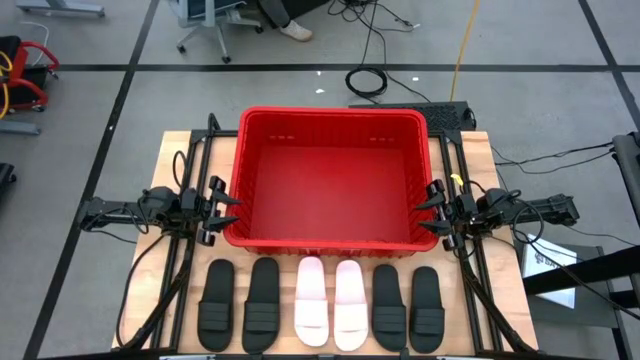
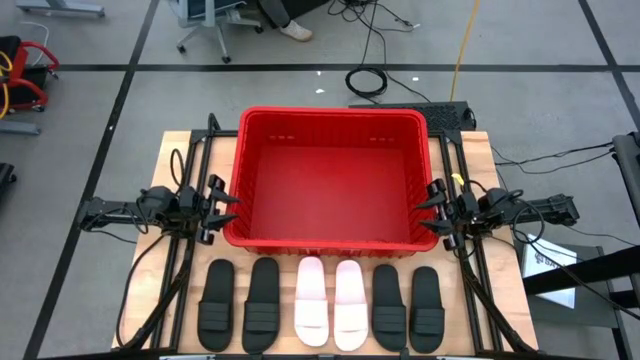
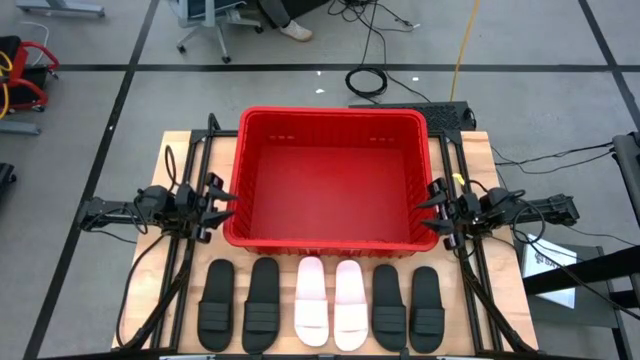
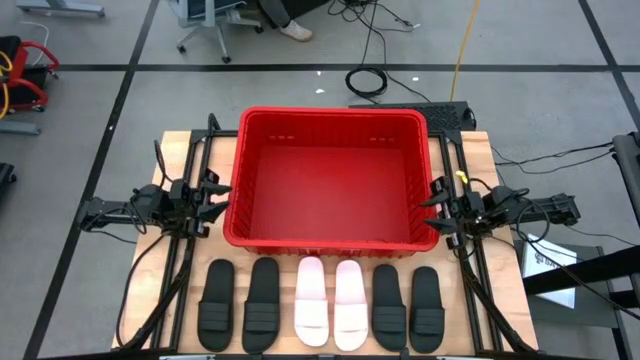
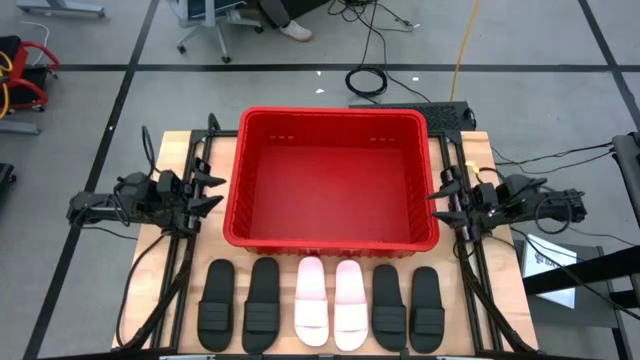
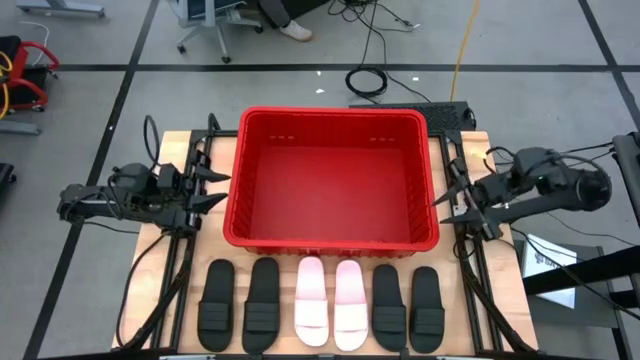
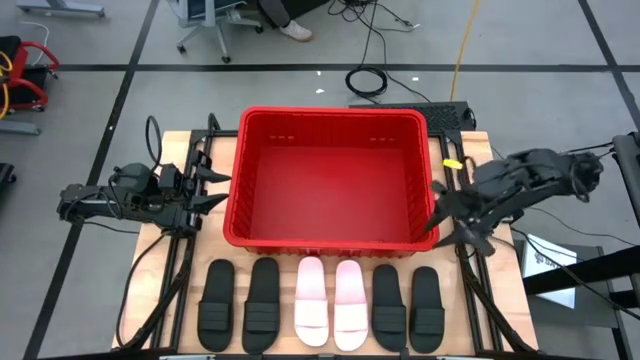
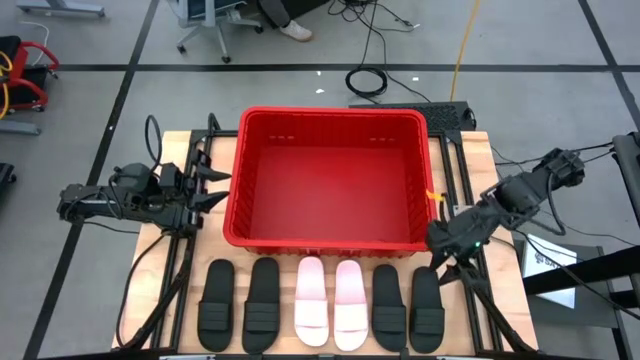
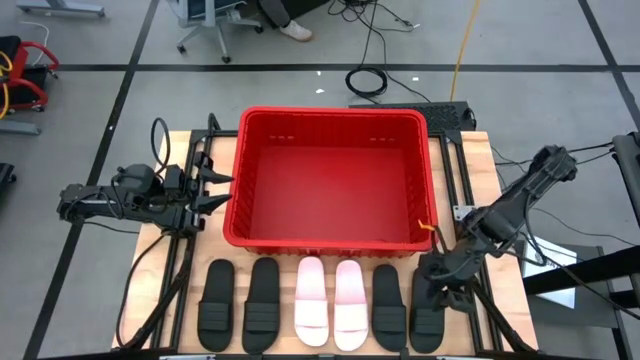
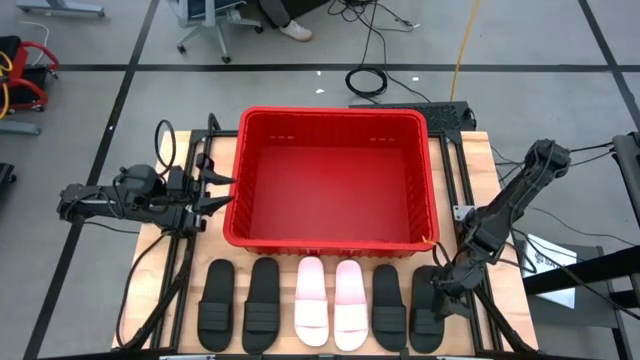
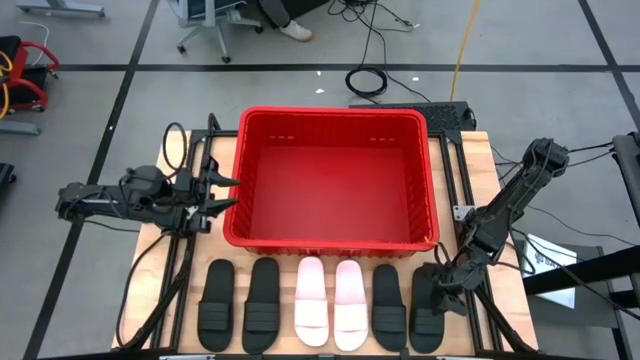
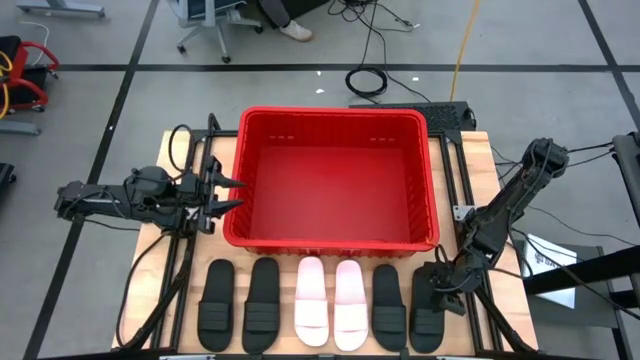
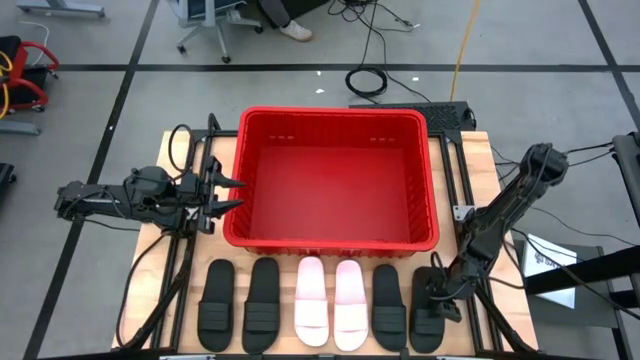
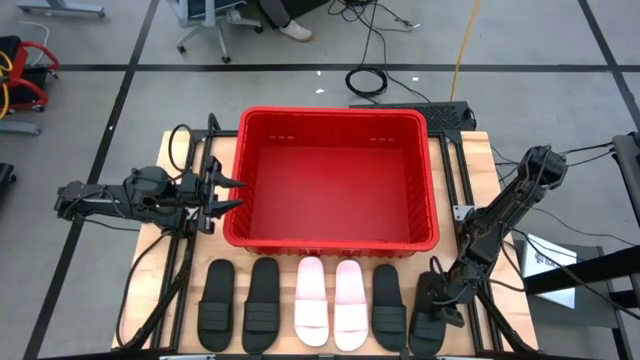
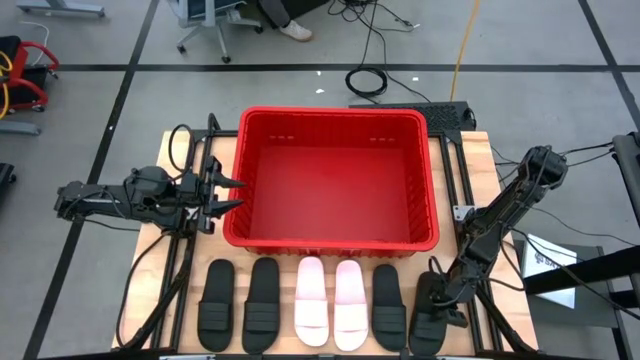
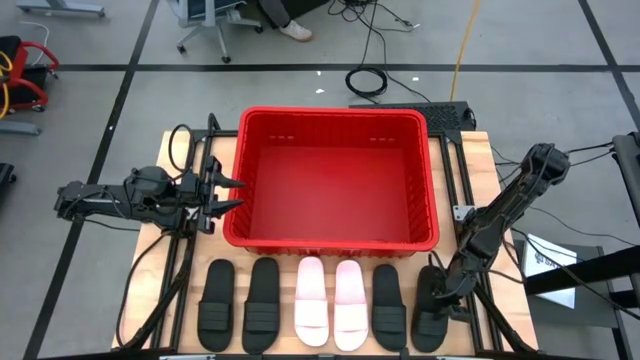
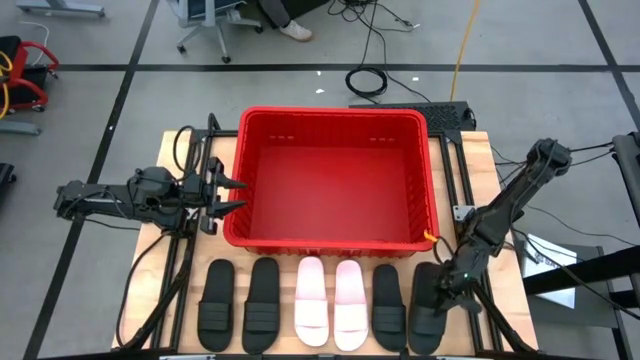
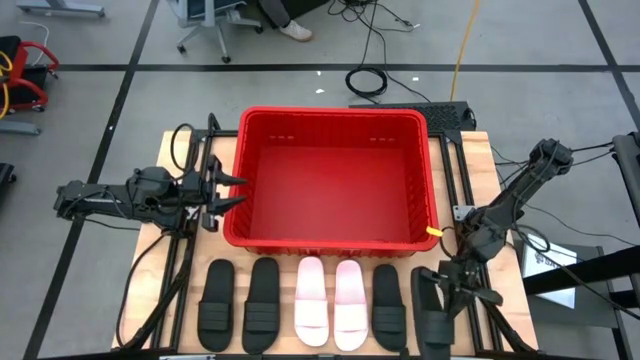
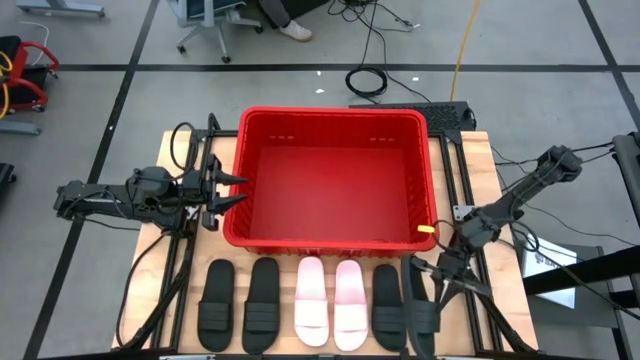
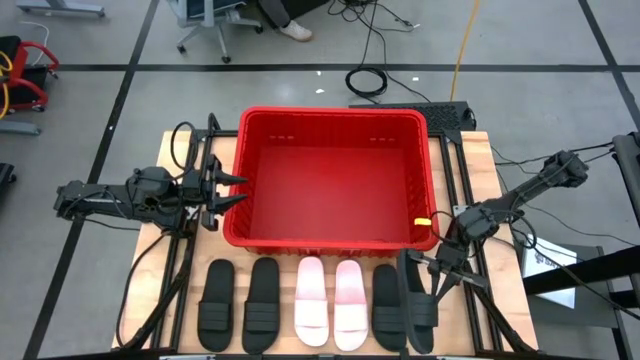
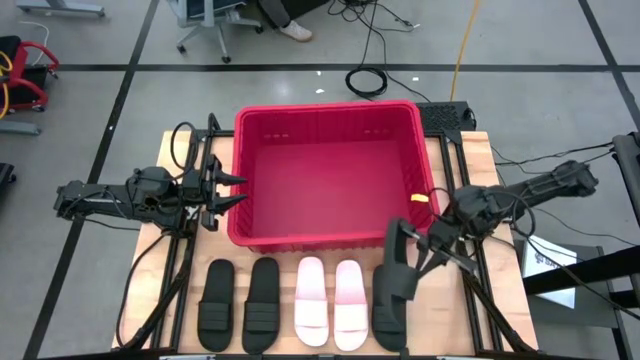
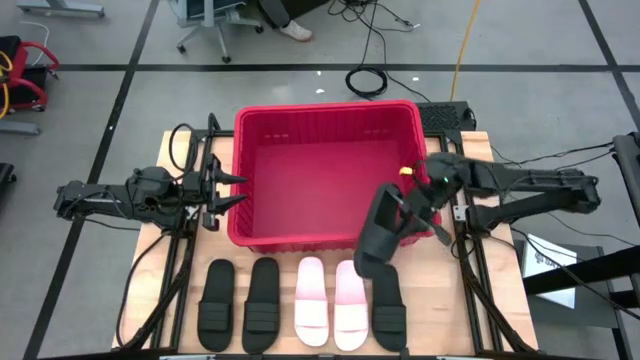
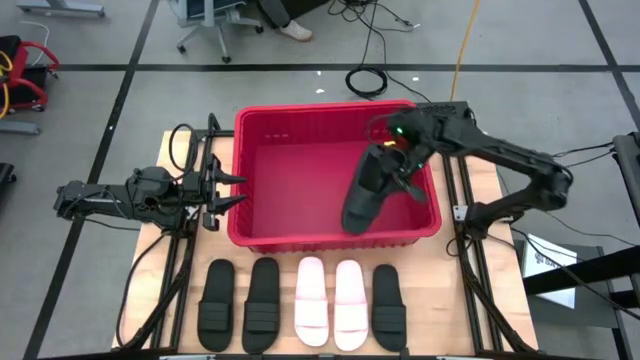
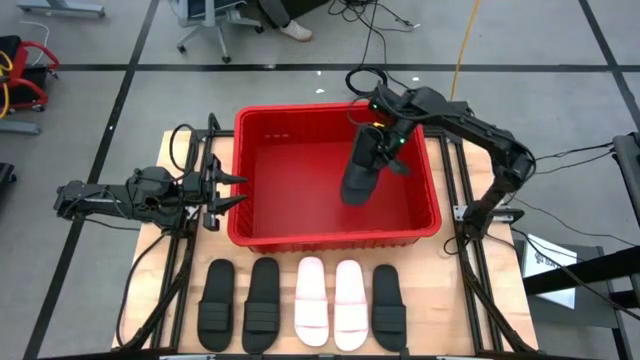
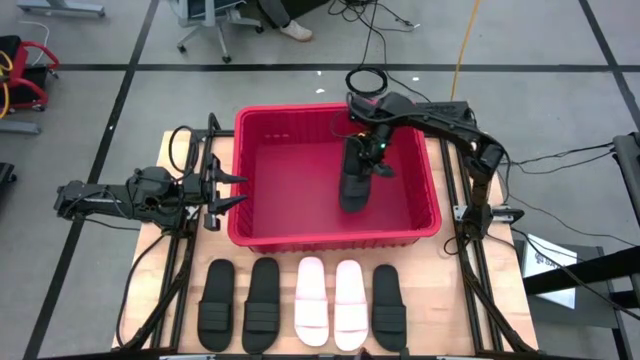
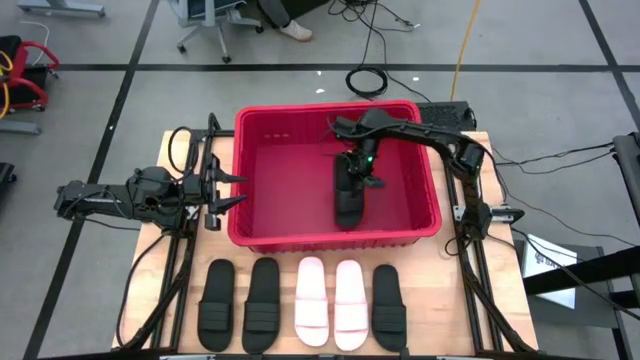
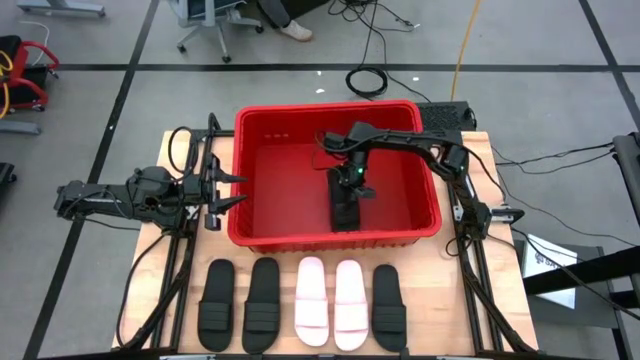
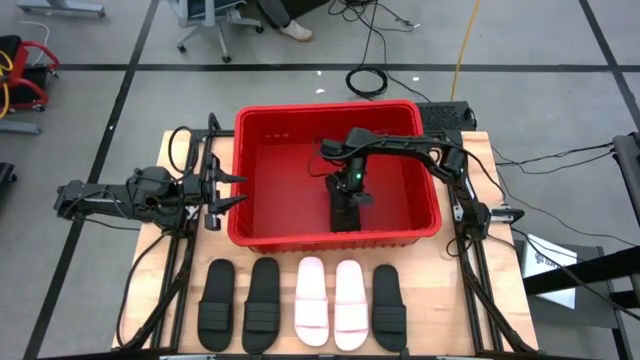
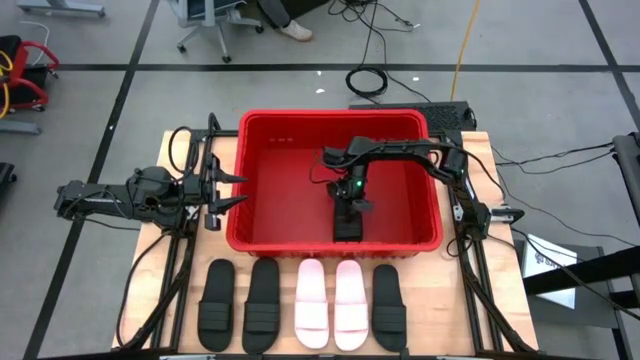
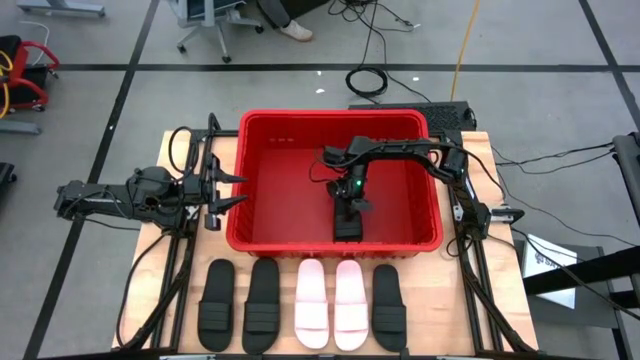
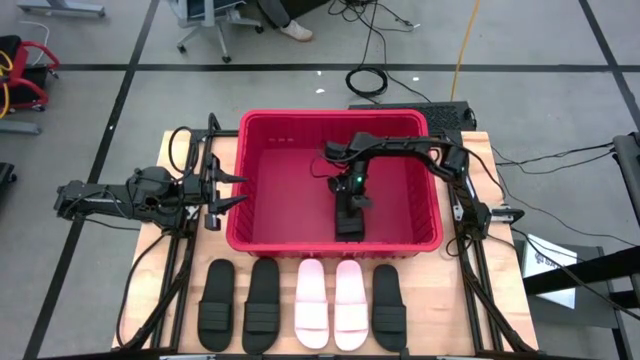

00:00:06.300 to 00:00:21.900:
Task: Pick and place slides into bin
Put the black slide into the red bin

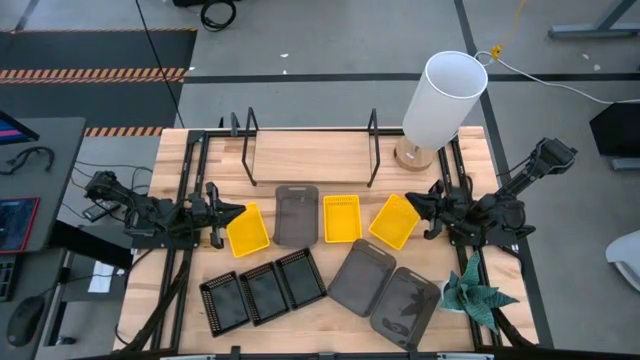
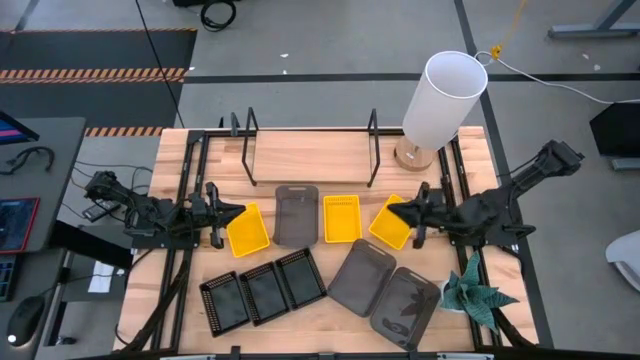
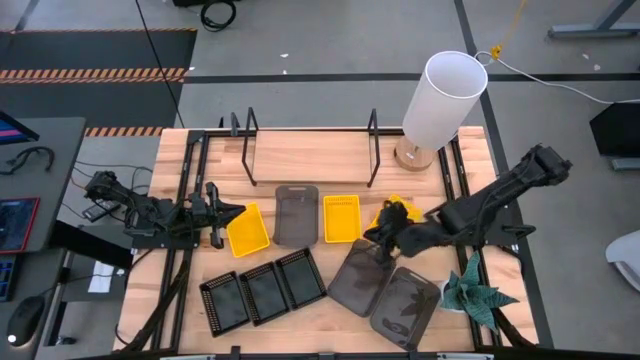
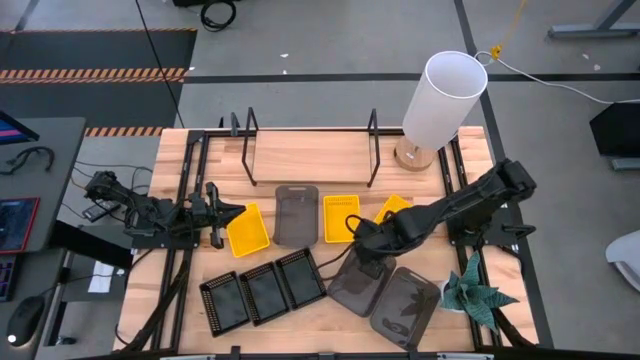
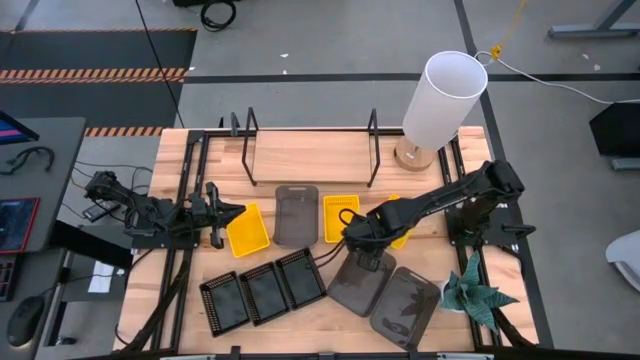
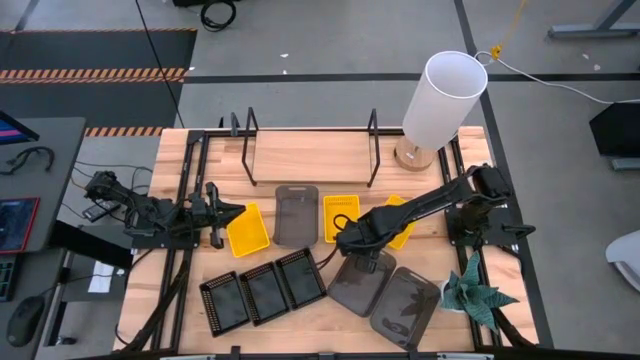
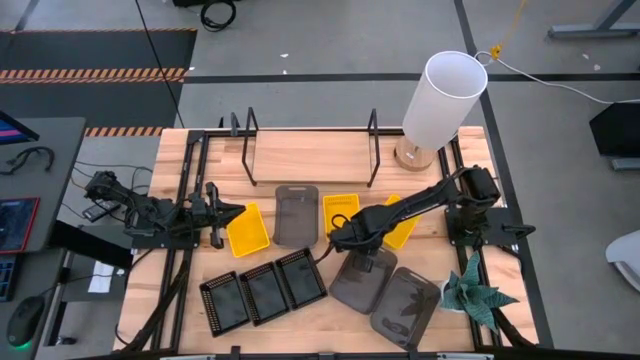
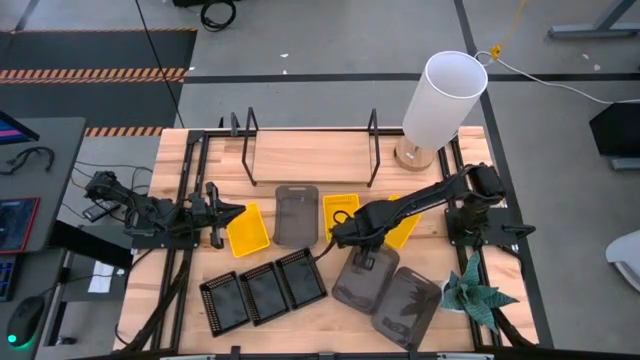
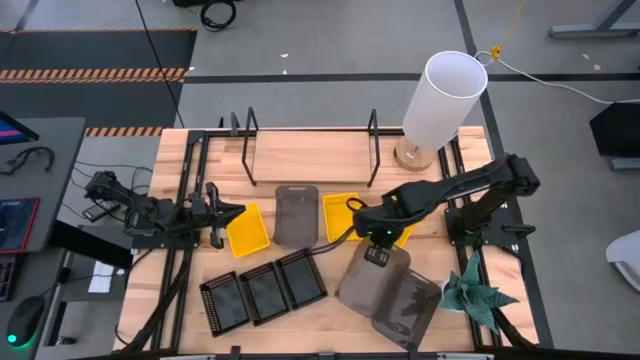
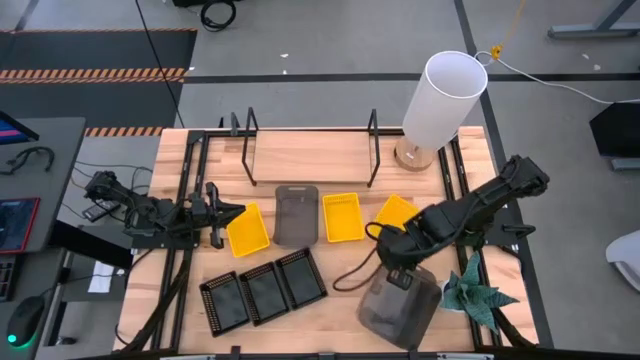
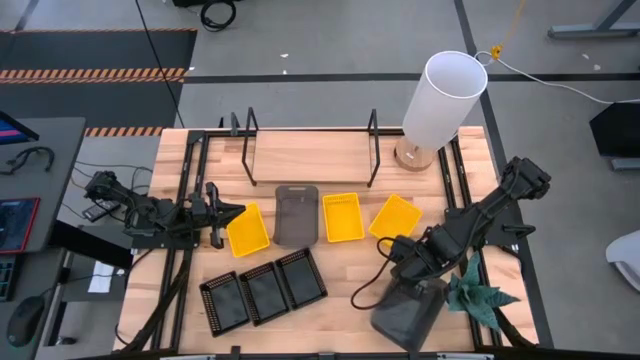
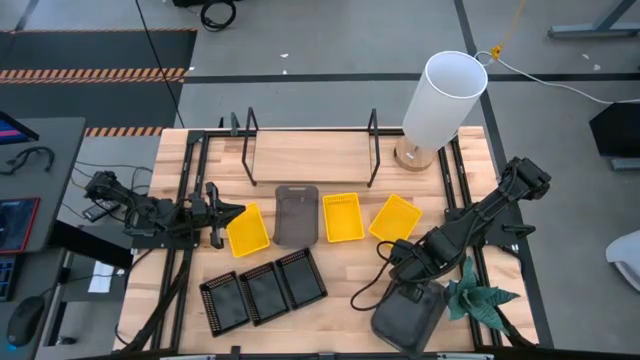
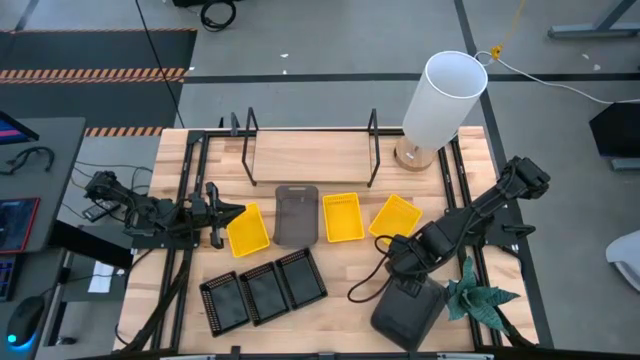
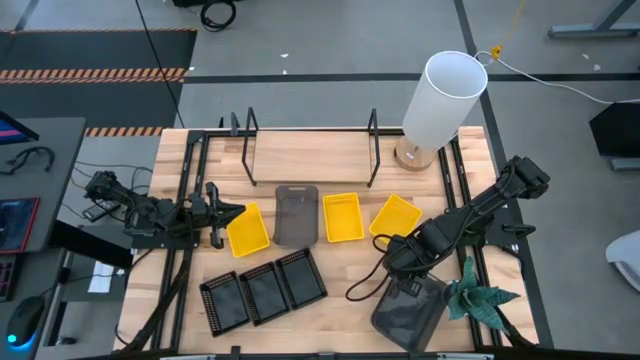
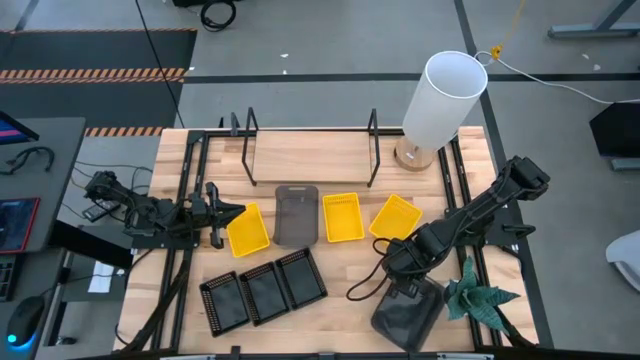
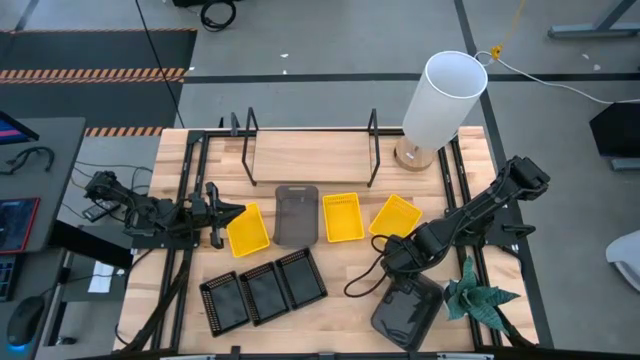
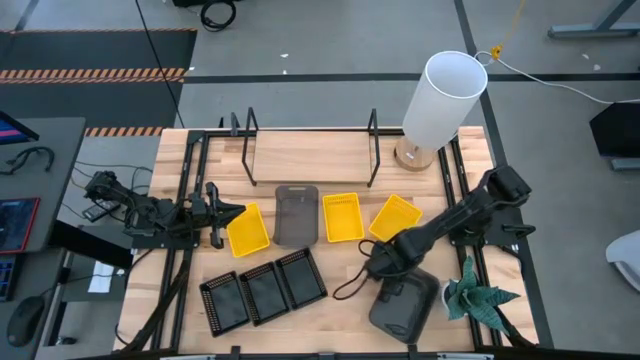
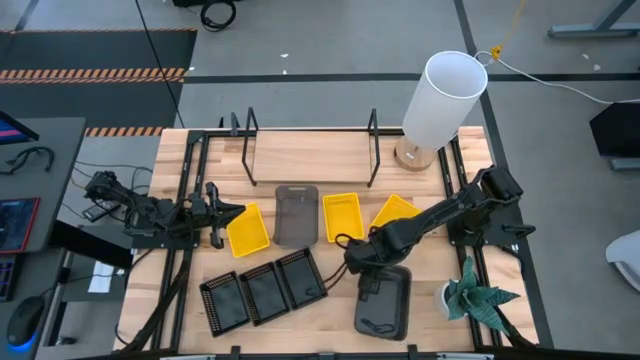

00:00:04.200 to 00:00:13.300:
Task: Stack baskets on shelf by color
Stack the center black bin on the bottom right black bin
